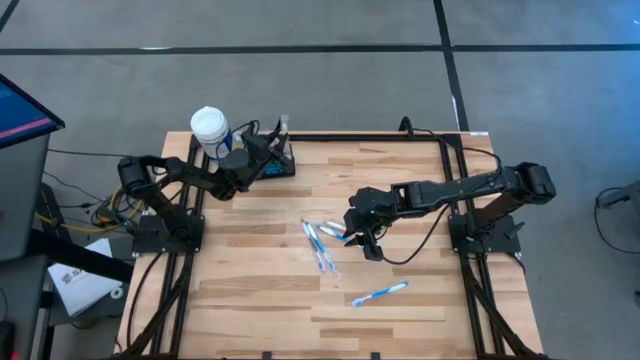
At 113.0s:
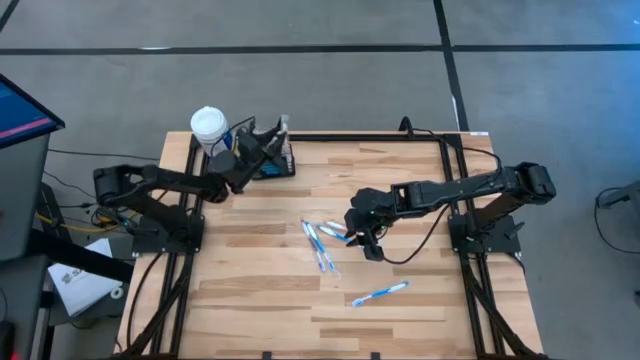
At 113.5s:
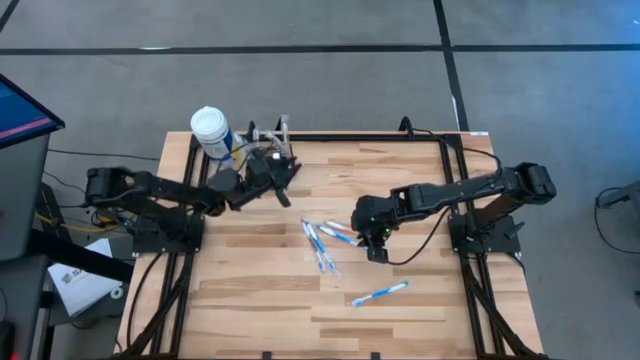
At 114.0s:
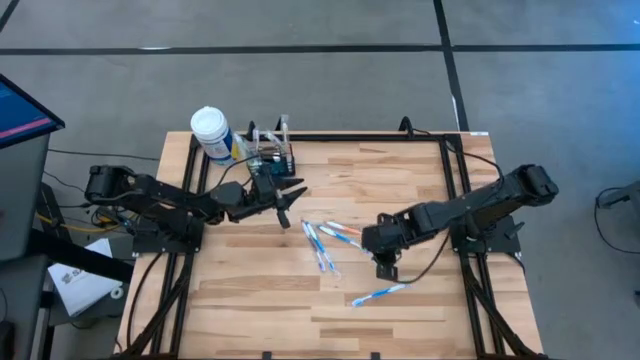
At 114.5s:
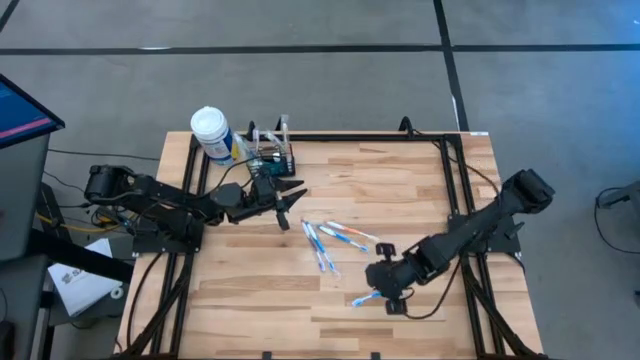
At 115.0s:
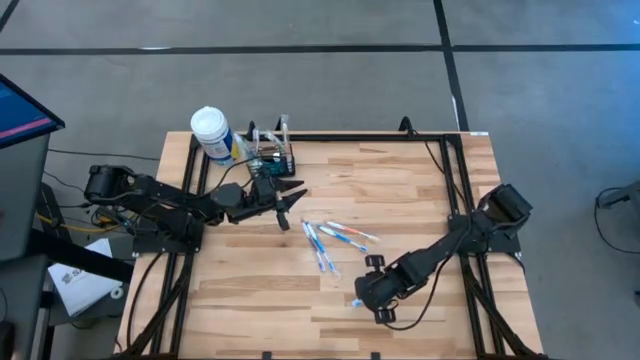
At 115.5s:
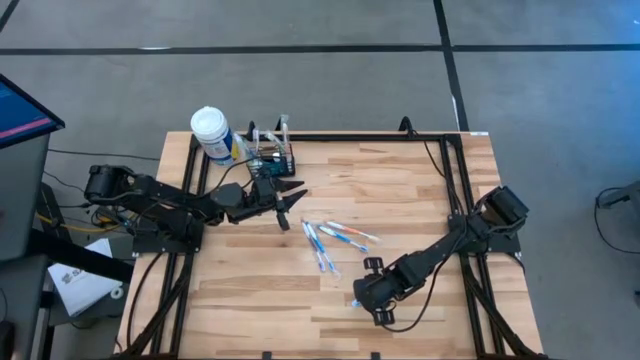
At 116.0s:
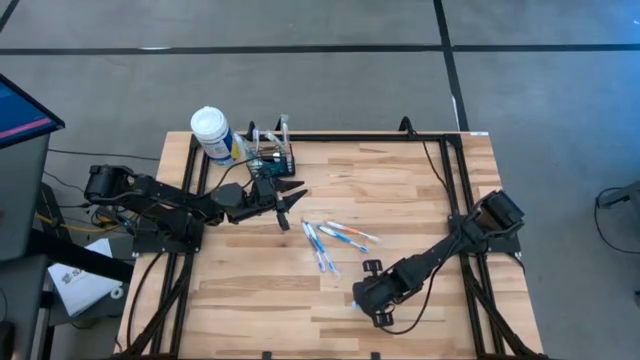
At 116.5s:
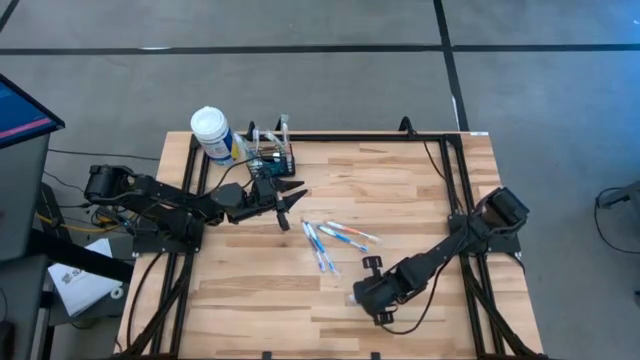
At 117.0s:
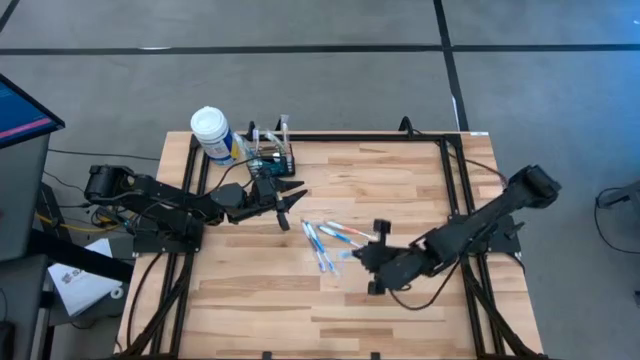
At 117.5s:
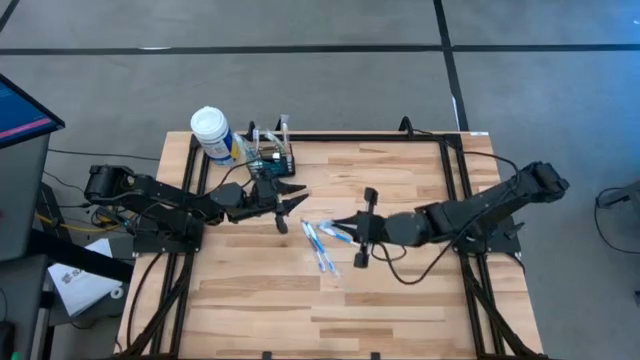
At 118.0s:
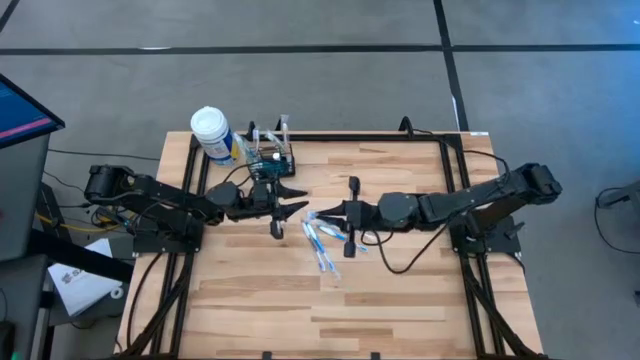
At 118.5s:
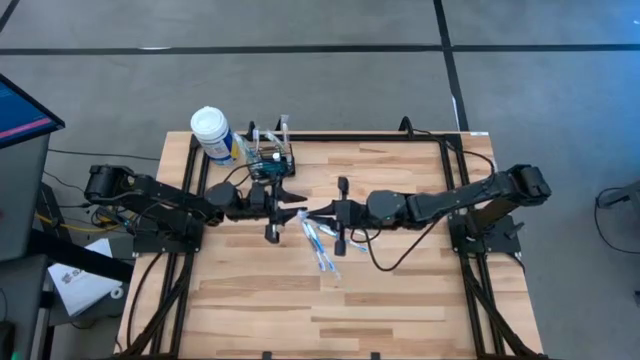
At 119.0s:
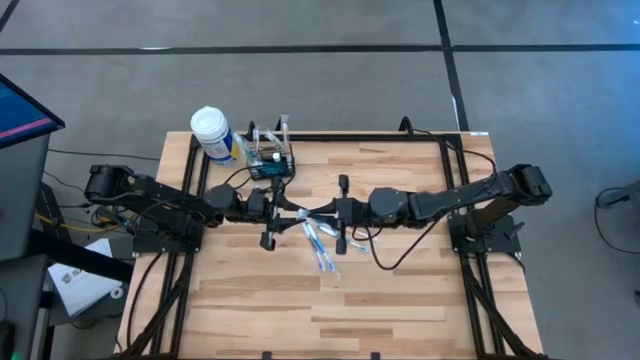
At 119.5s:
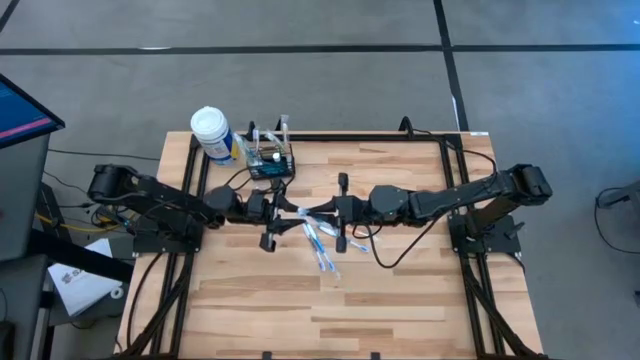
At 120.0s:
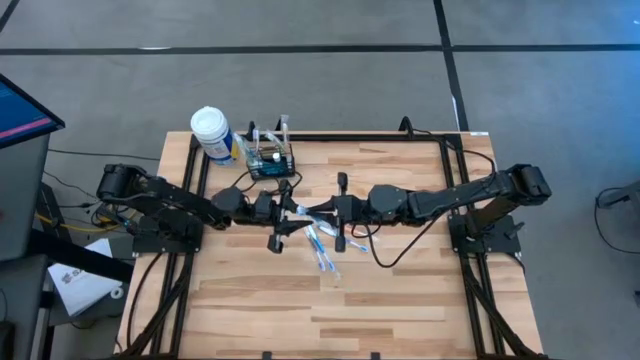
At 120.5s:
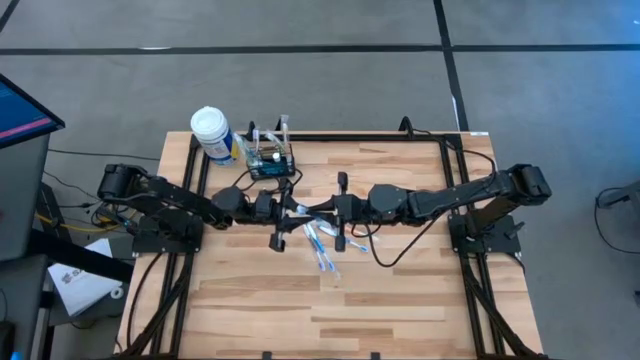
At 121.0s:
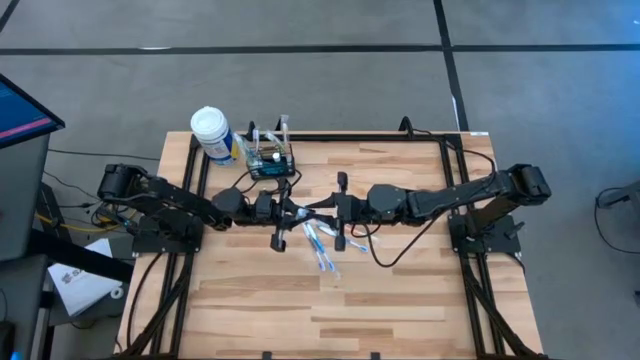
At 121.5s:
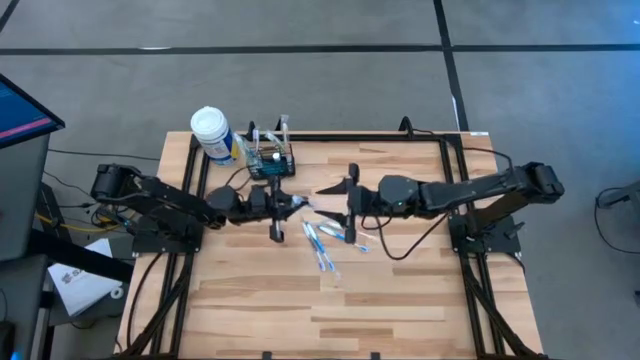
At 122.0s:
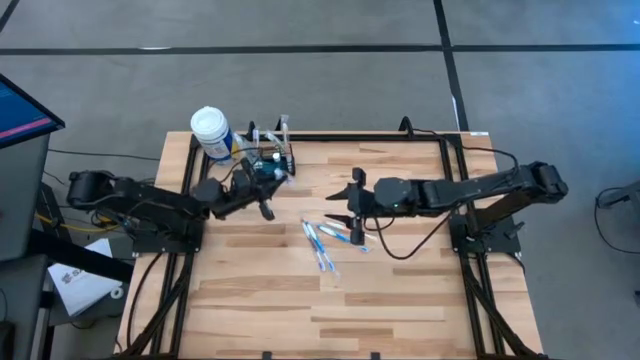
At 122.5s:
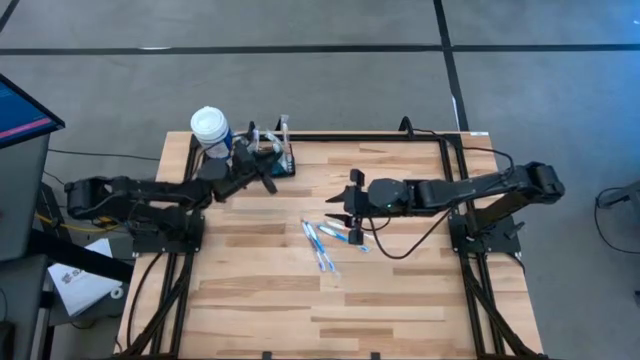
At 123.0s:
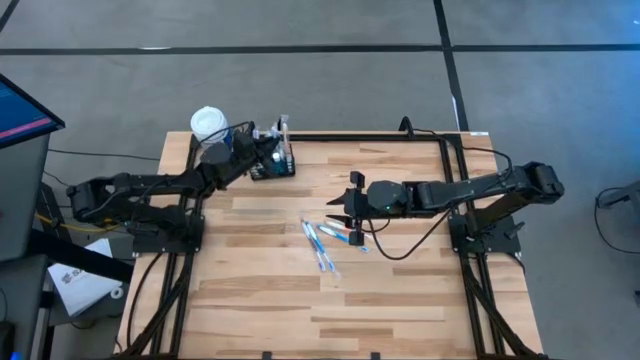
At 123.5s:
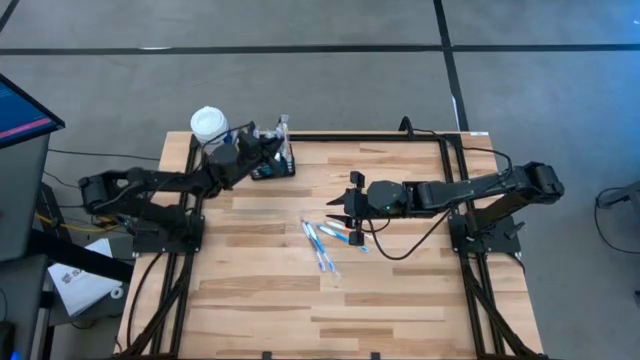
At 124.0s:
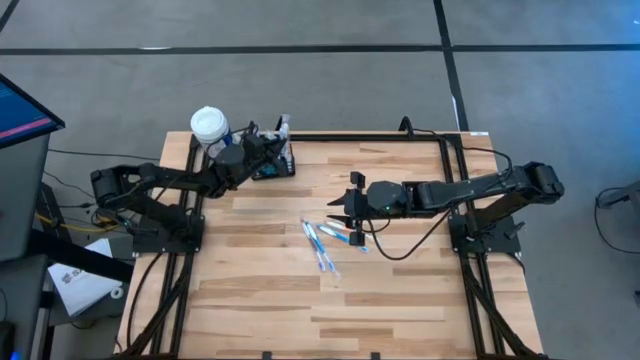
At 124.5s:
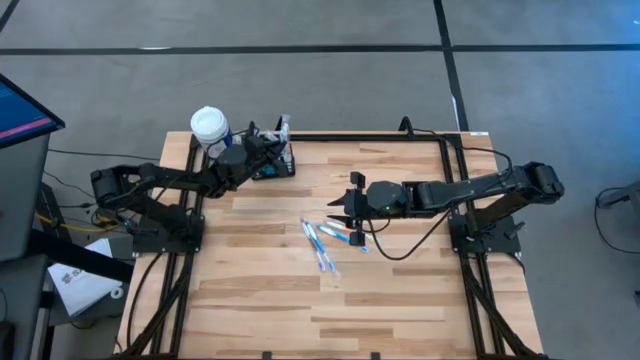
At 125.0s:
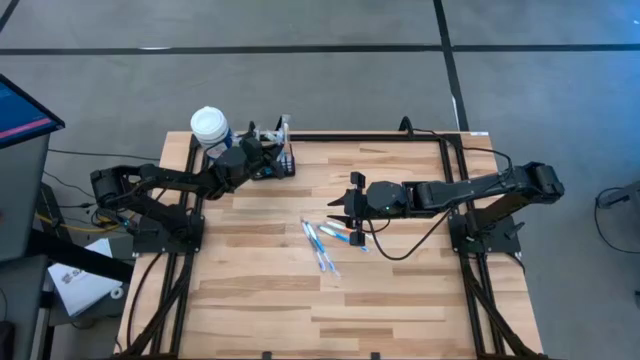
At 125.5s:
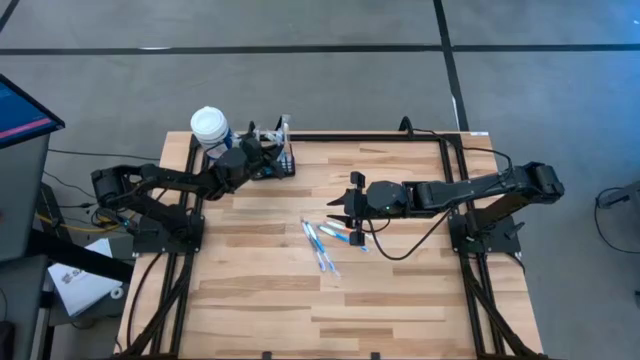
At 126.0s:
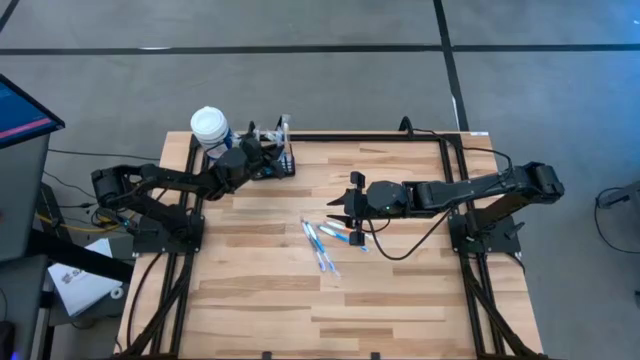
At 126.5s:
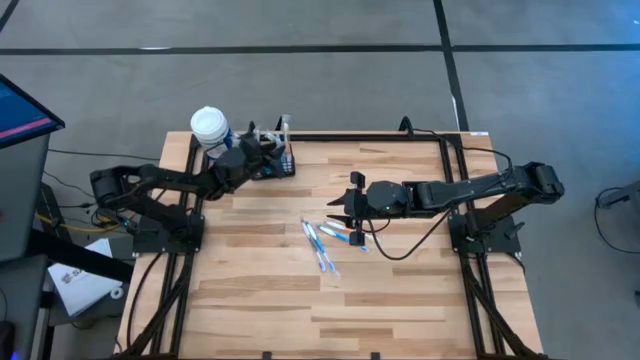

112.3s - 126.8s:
Task: Pick & Place toothbrushing station
Put the blue toothbrush into the black wire organizer

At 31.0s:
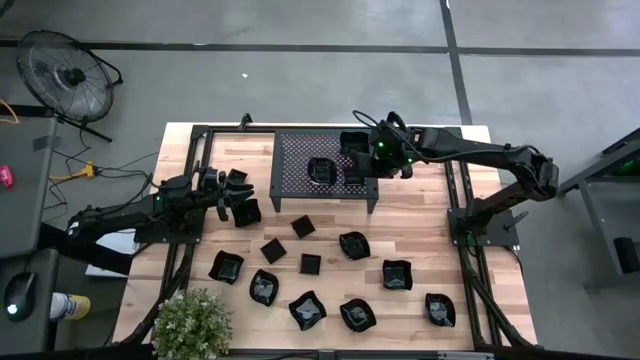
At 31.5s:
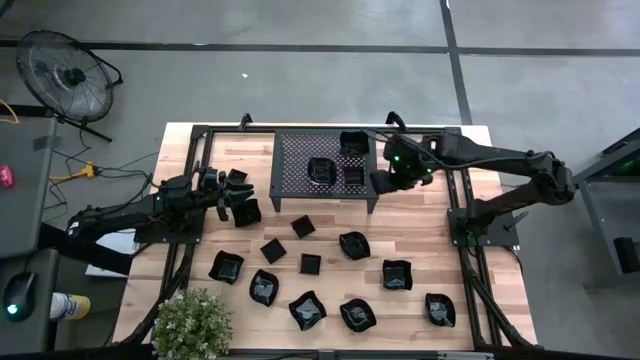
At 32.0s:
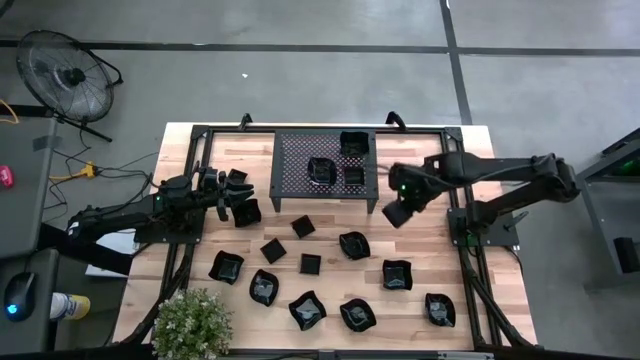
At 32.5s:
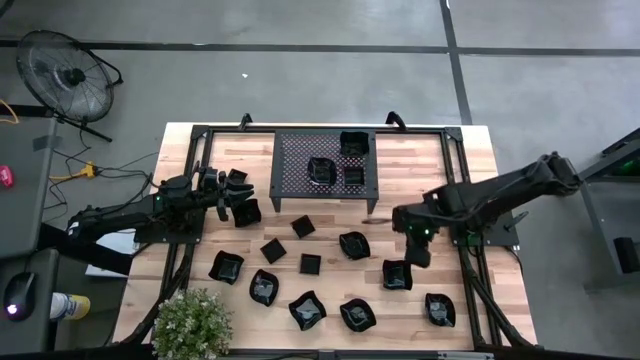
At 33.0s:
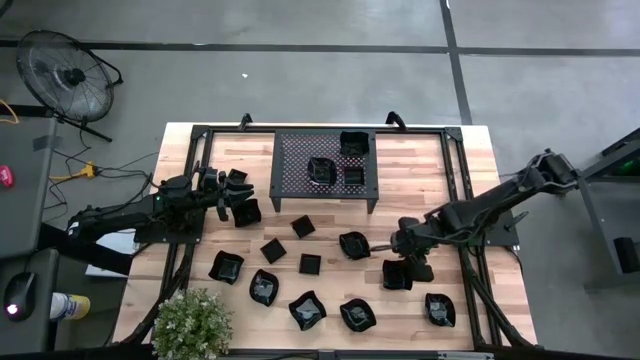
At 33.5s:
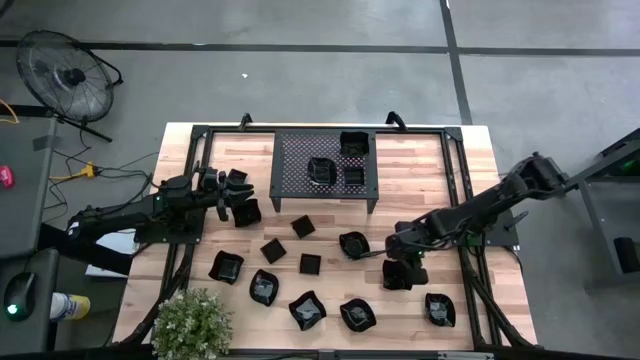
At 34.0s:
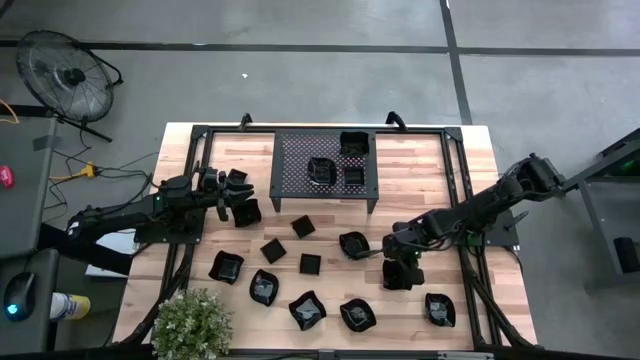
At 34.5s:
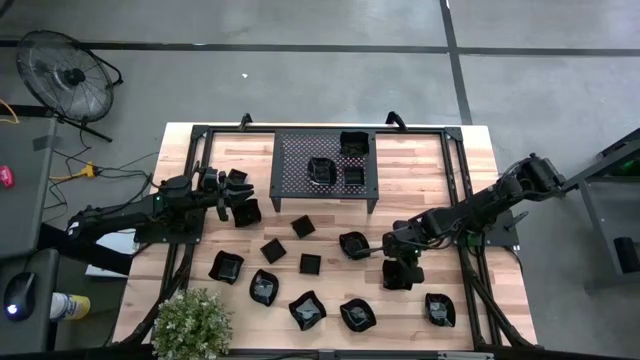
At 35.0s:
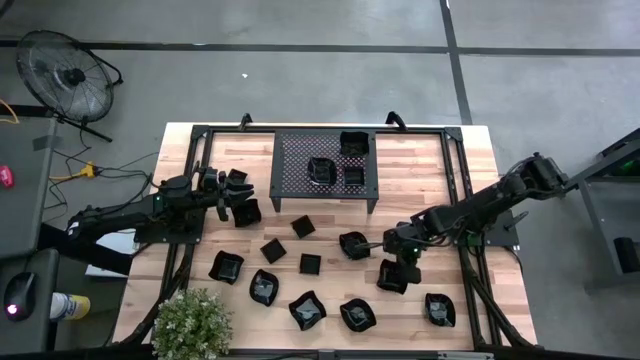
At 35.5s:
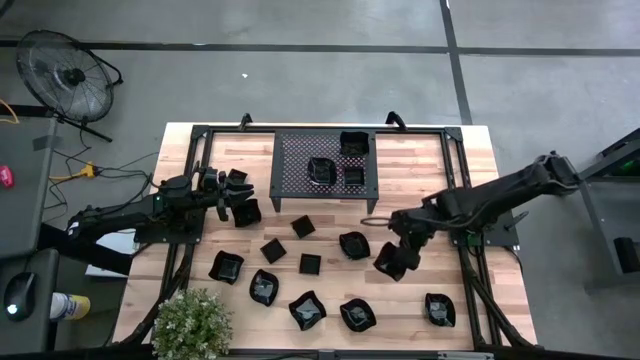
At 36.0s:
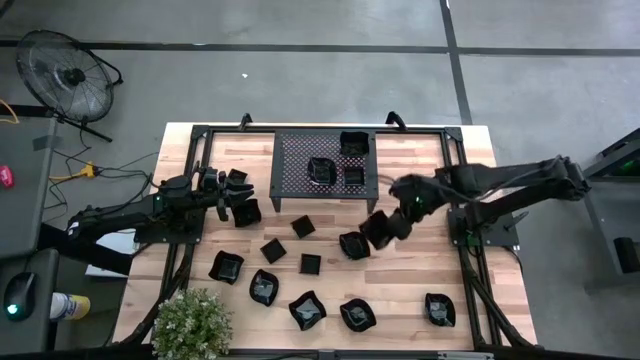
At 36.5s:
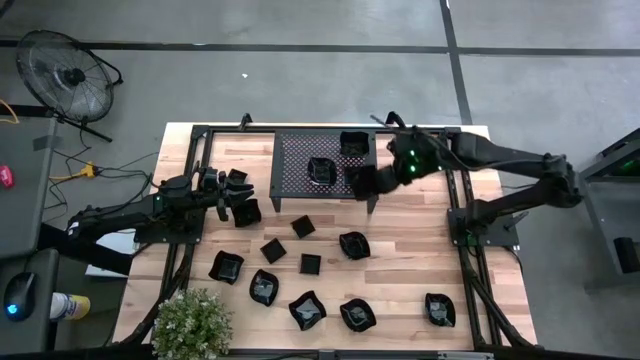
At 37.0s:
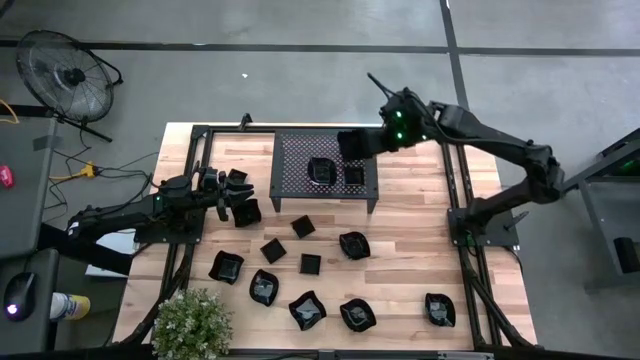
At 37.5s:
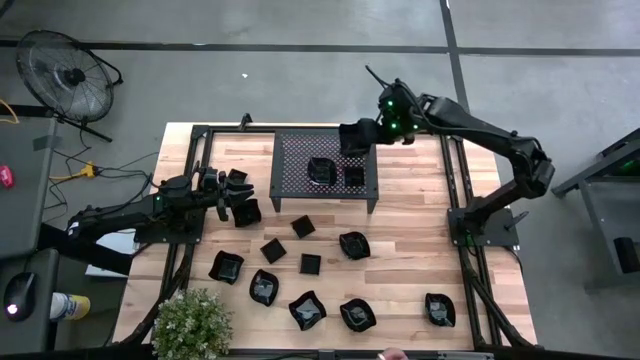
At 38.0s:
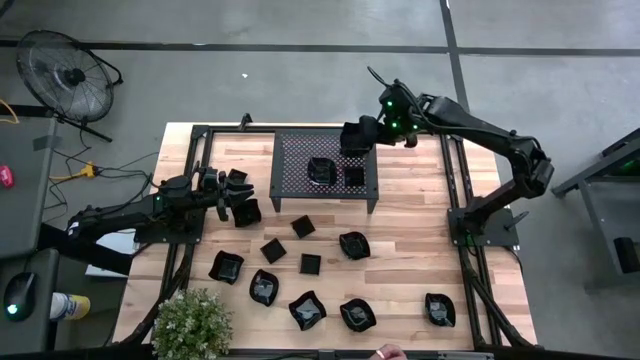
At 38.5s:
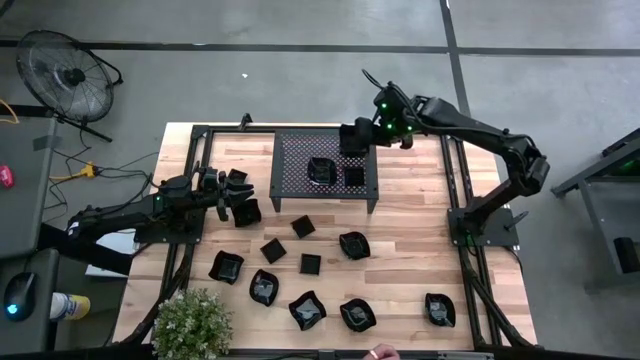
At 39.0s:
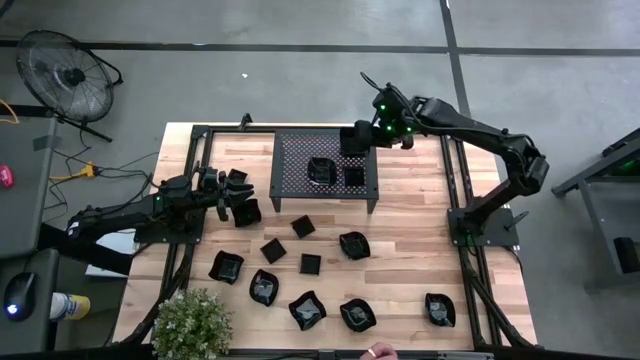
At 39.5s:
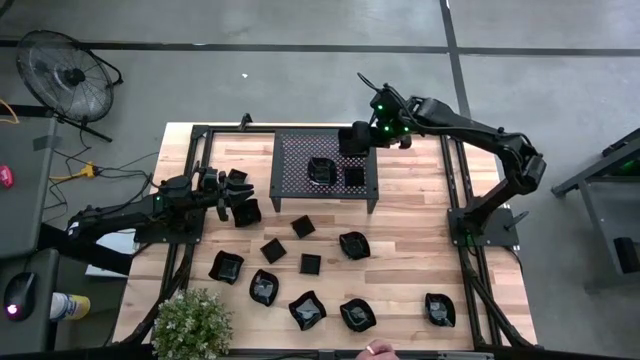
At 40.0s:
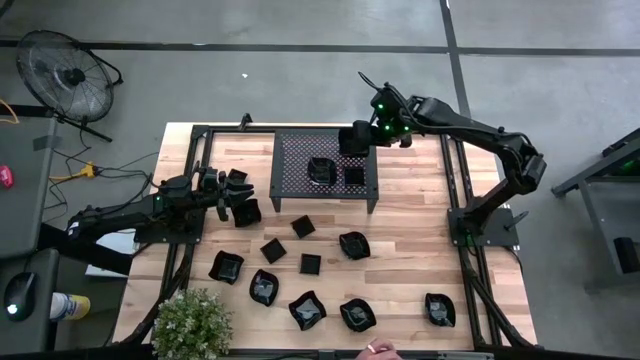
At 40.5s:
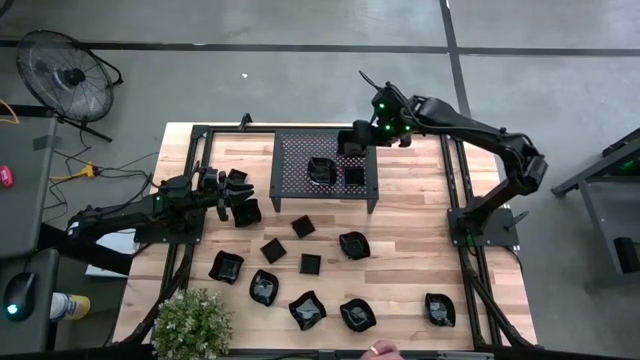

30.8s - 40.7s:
Task: Pick & Place Mini shaped plates
Stack the black distorted square plate on top of the other black distorted square plate on the shelf
